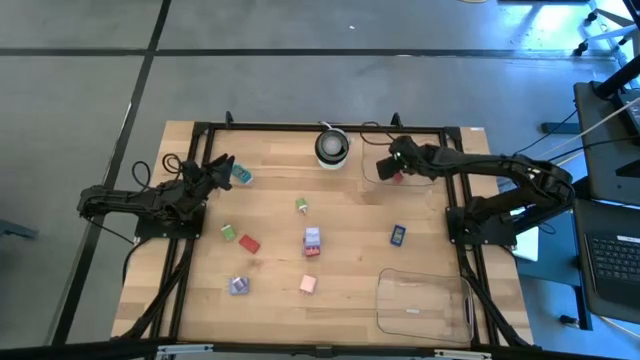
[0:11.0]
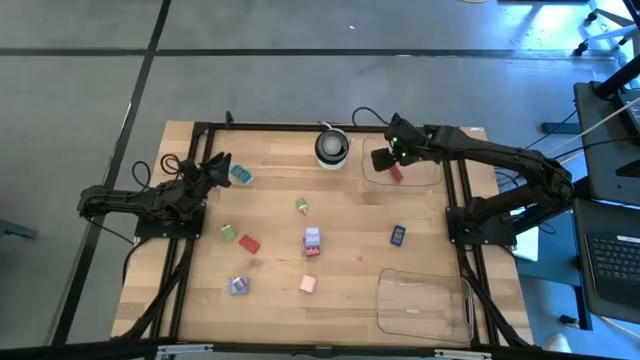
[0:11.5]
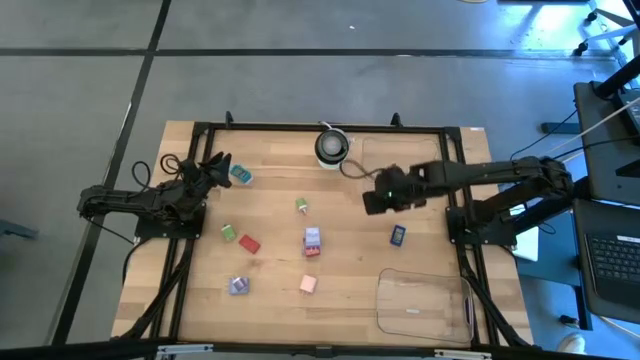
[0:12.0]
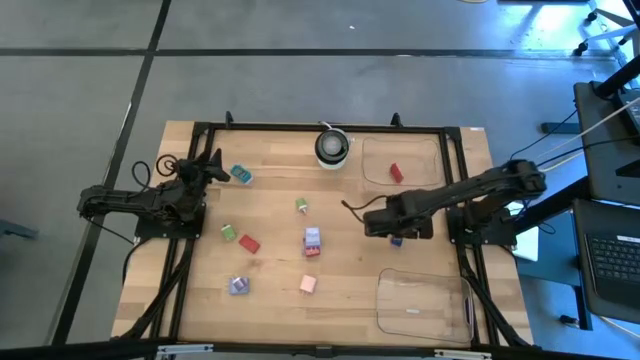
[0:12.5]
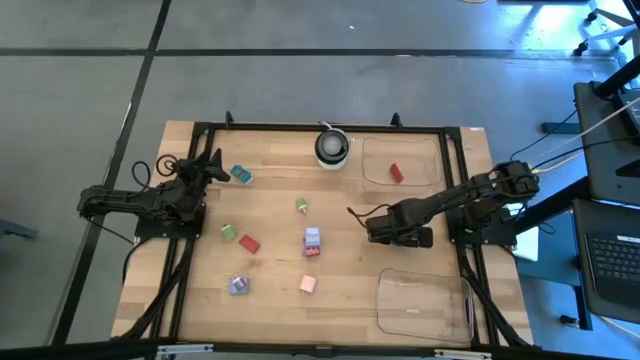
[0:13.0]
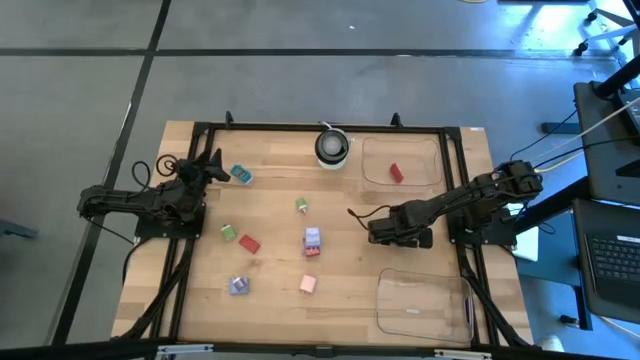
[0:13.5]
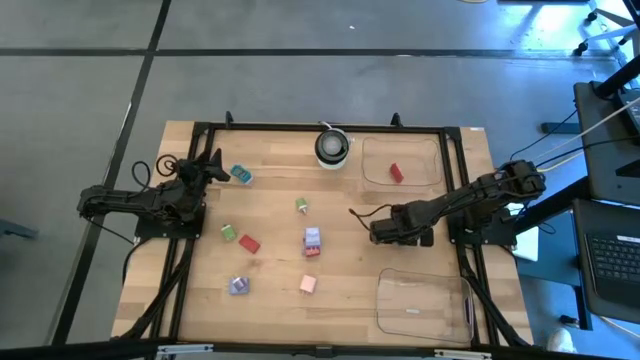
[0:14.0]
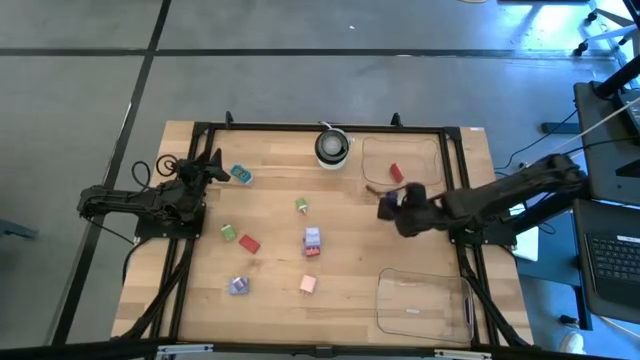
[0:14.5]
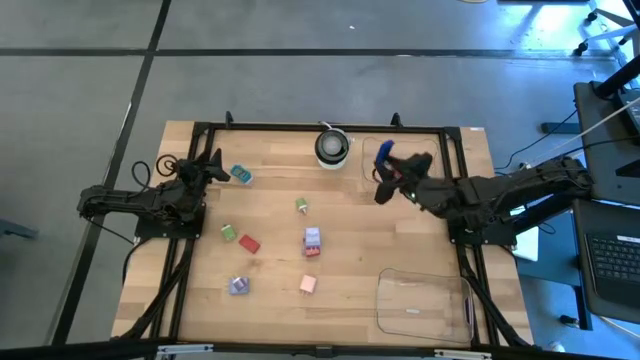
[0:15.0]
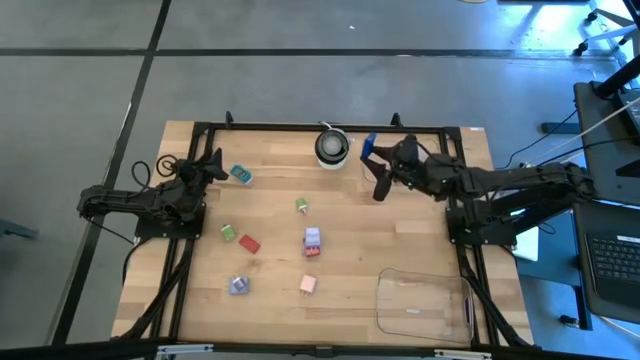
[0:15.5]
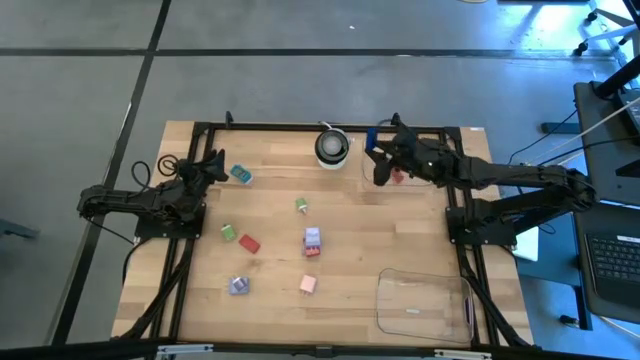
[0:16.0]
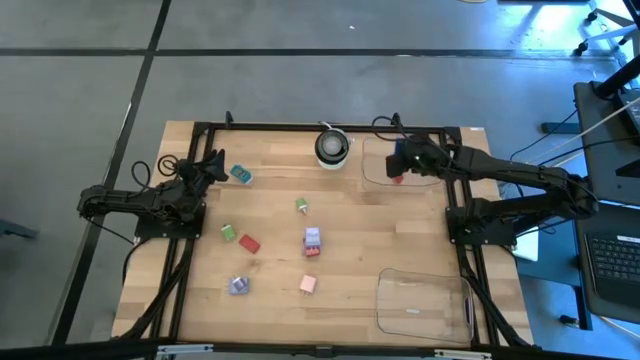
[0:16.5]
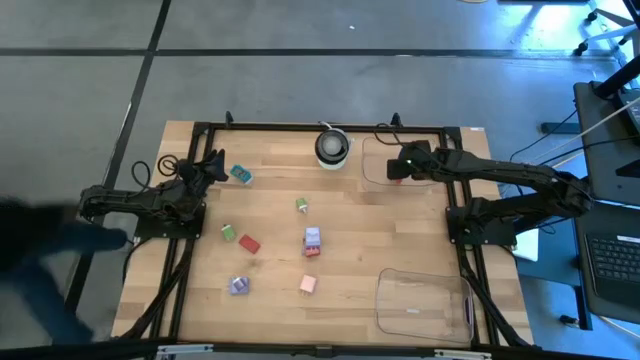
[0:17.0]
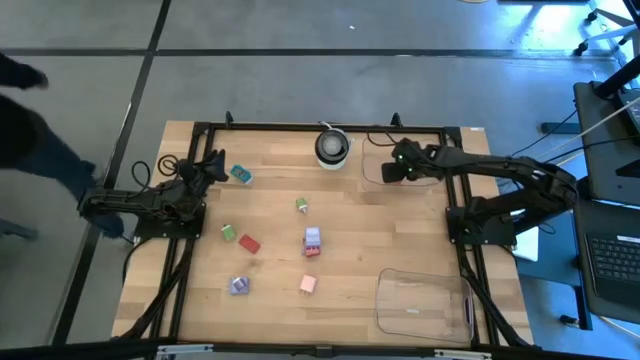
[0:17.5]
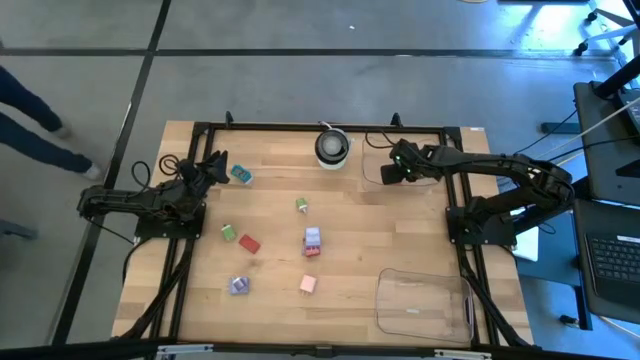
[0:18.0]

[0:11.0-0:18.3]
Task: Pick & Place Office items
Put the blue digital timer into the top transparent bin

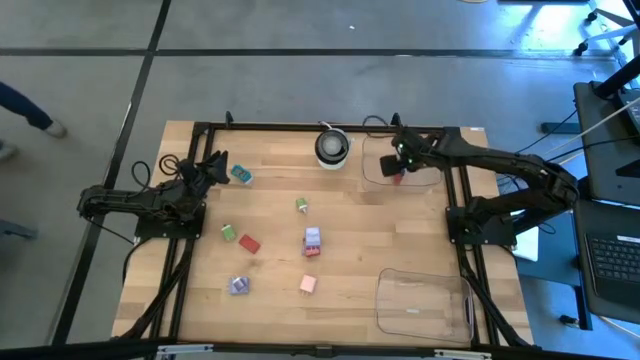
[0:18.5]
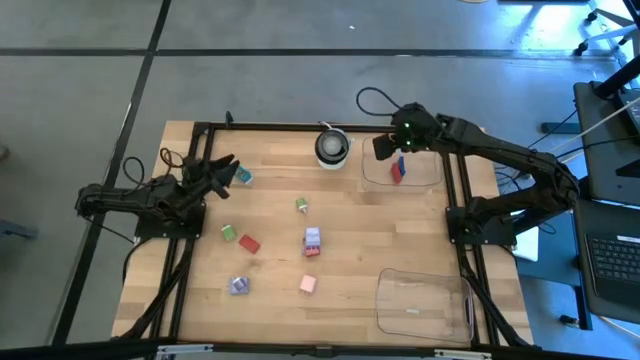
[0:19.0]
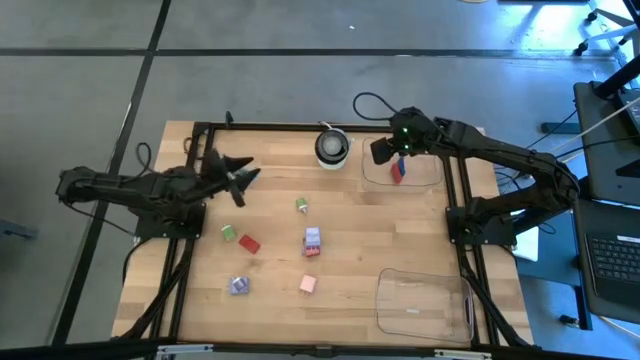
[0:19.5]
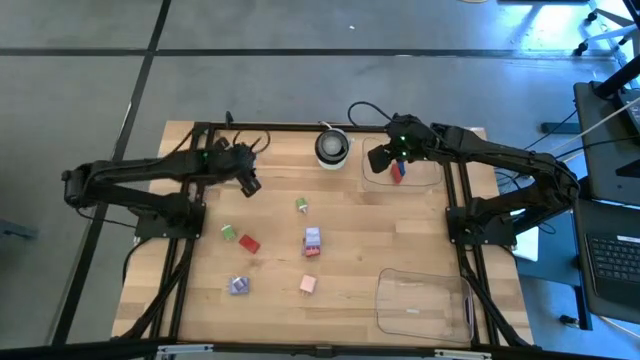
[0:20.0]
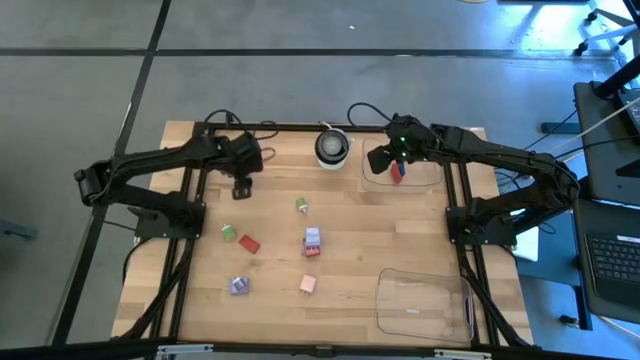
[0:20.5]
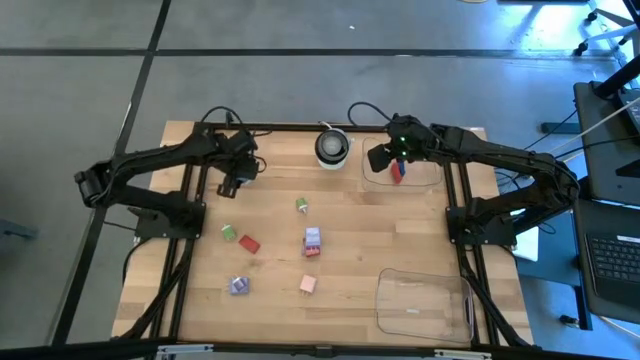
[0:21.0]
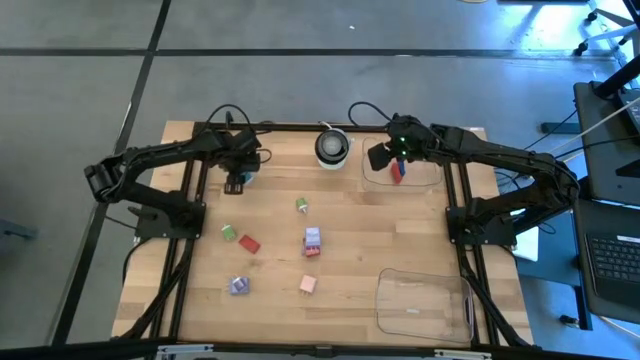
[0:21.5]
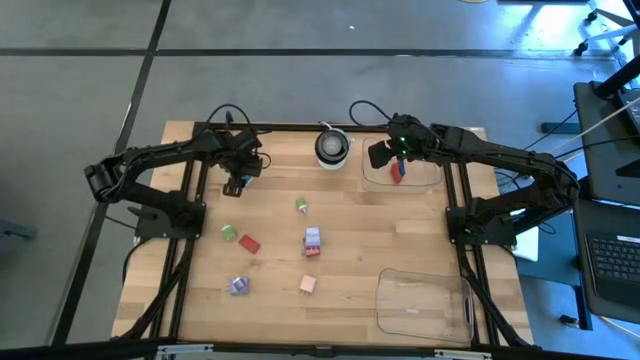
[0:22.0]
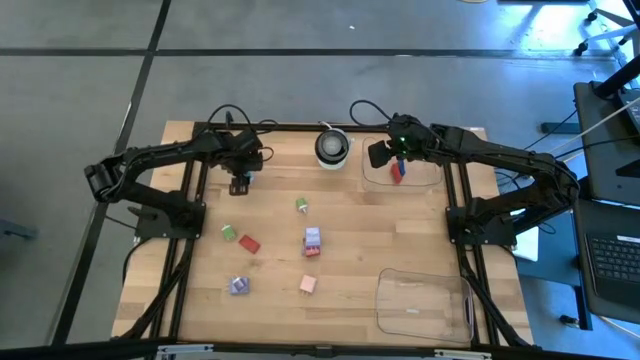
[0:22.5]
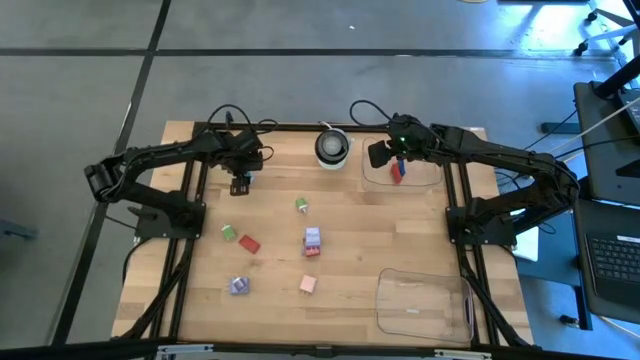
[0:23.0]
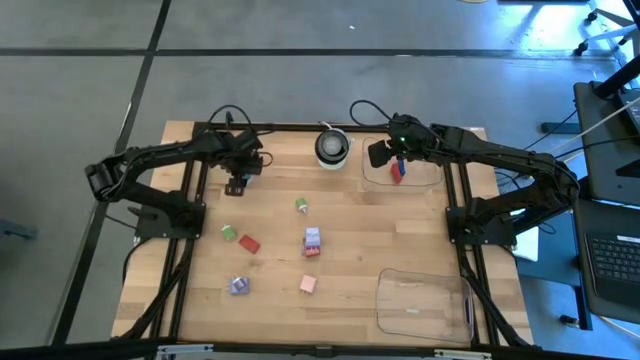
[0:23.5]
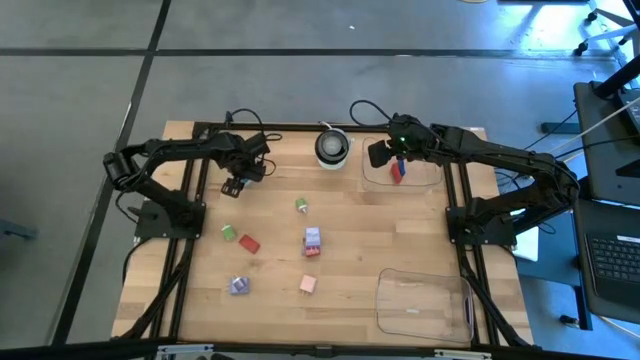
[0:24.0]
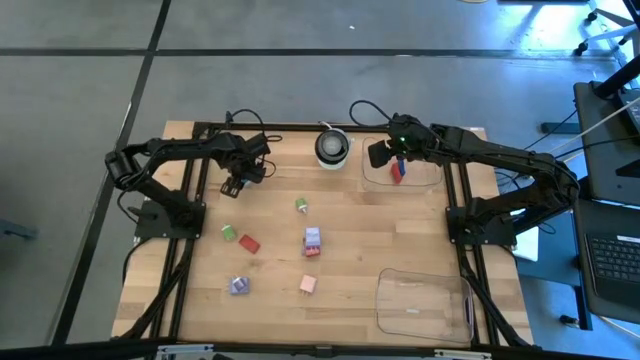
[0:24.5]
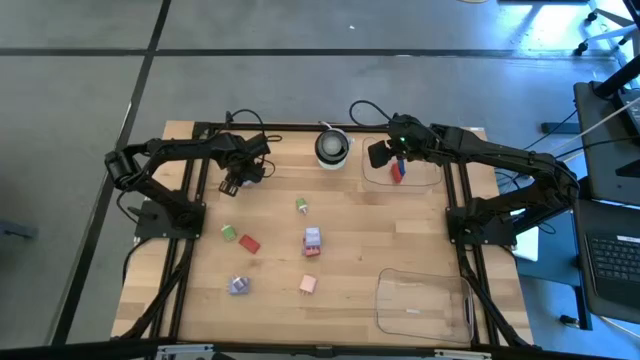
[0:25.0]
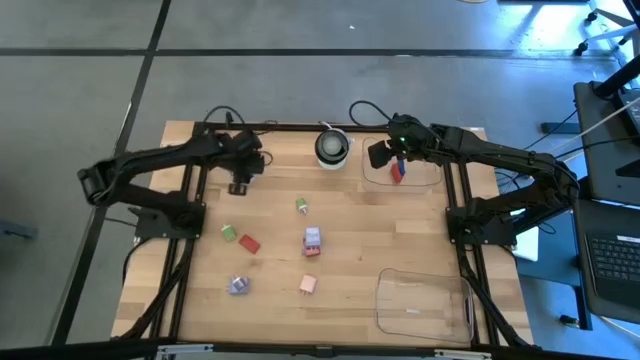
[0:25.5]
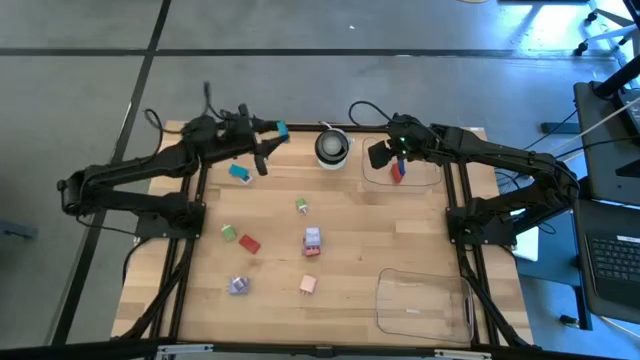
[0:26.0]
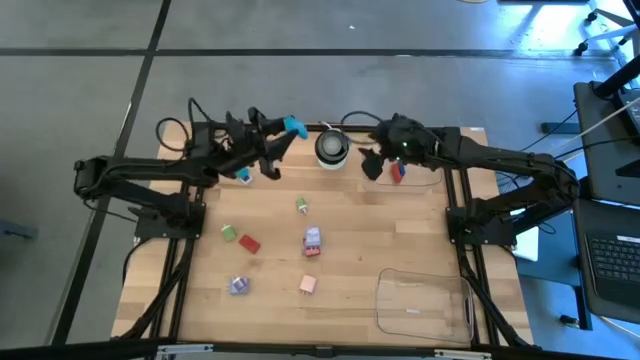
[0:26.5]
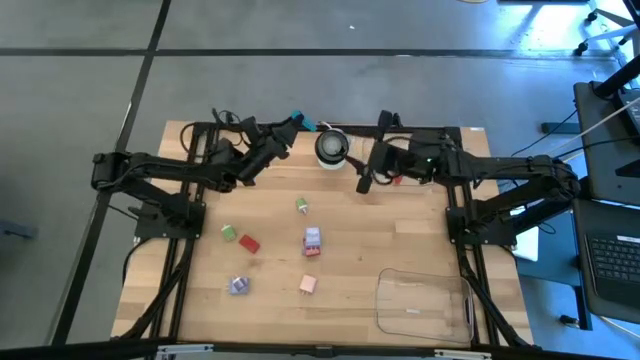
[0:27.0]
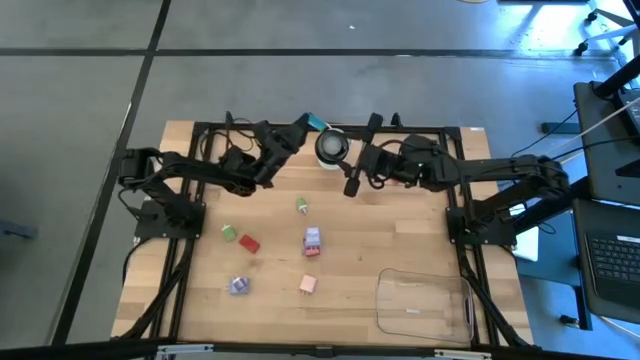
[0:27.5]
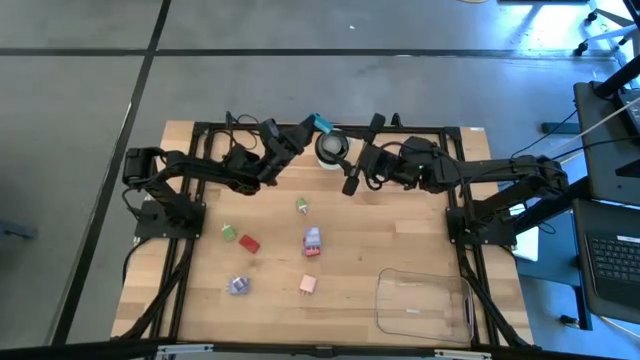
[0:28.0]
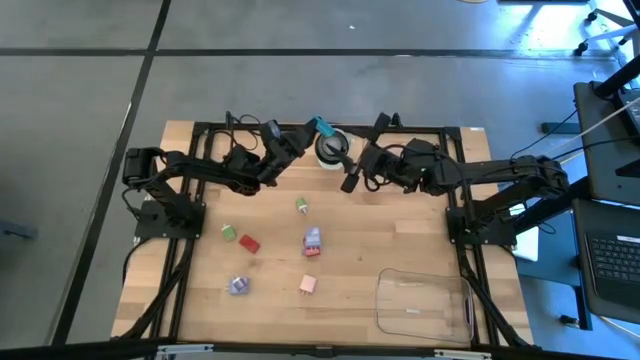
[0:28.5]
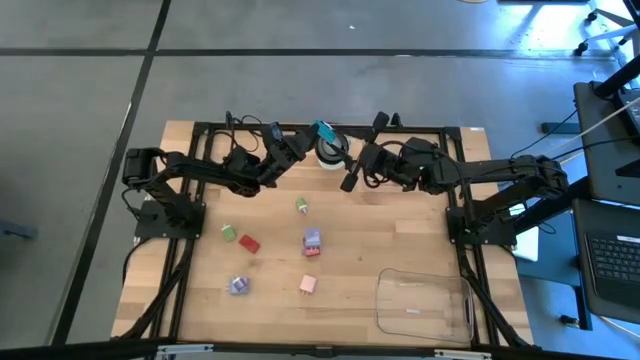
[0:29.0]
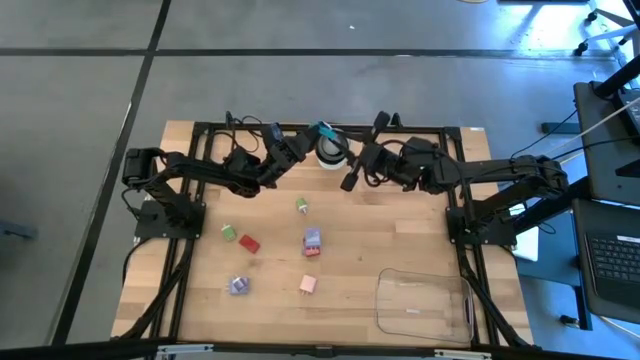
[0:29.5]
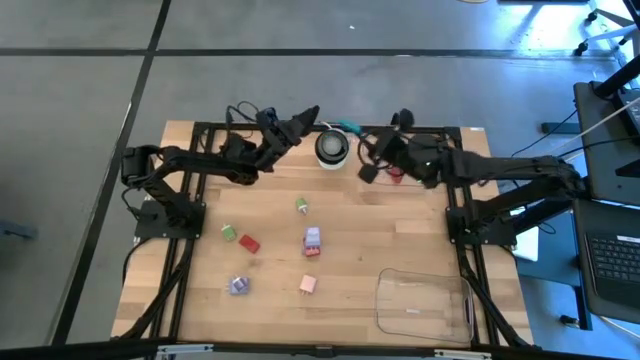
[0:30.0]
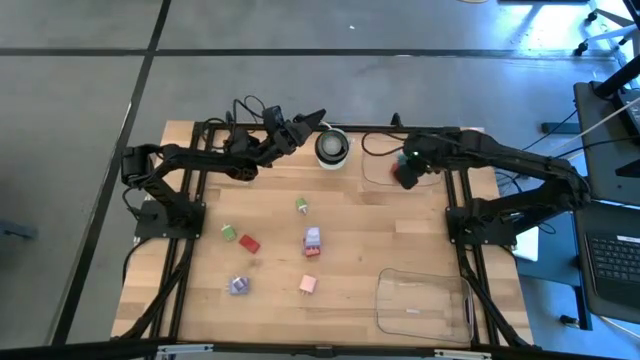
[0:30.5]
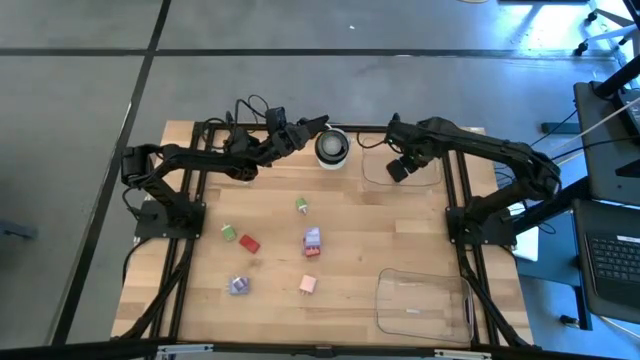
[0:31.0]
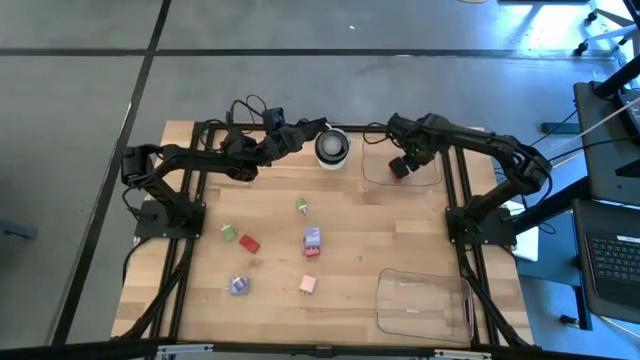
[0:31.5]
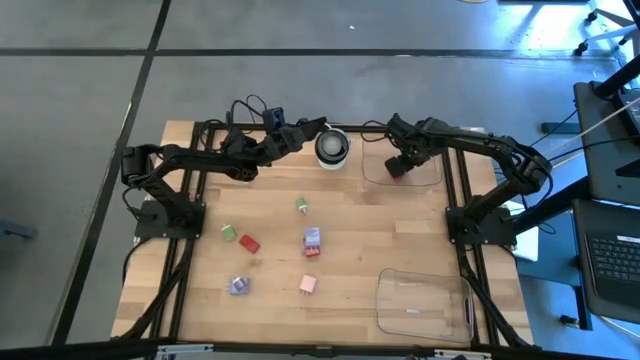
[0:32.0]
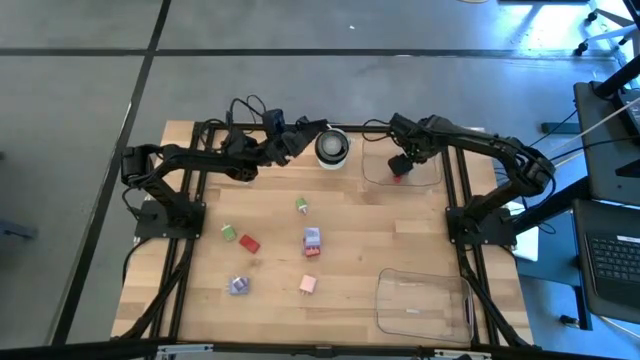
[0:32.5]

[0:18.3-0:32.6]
Put the light blue digital timer into the top transparent bin
